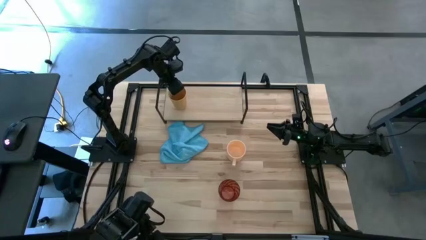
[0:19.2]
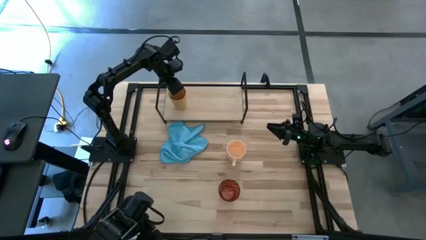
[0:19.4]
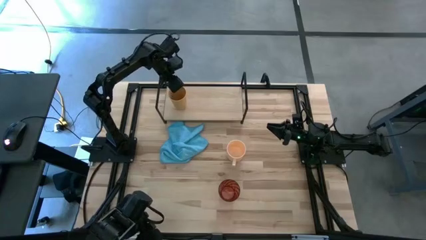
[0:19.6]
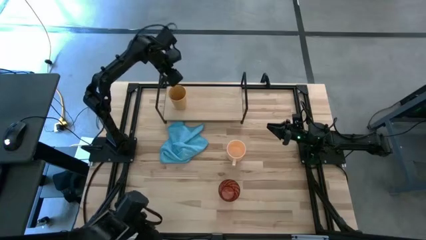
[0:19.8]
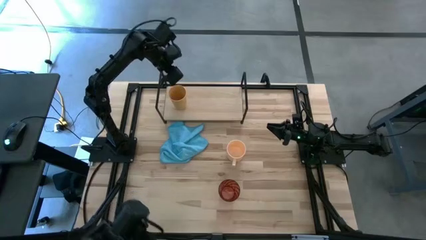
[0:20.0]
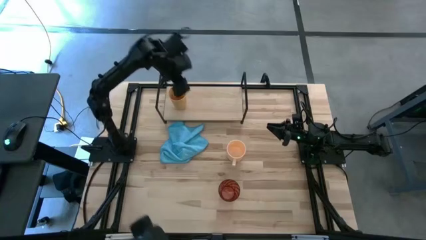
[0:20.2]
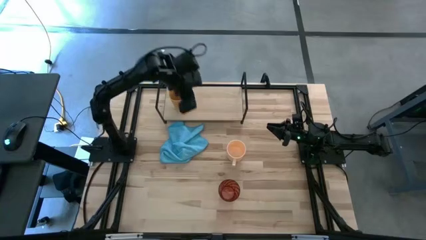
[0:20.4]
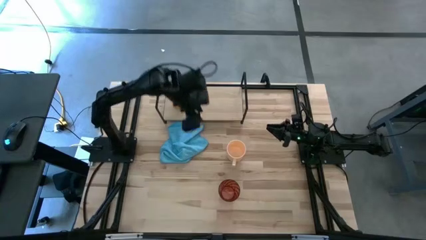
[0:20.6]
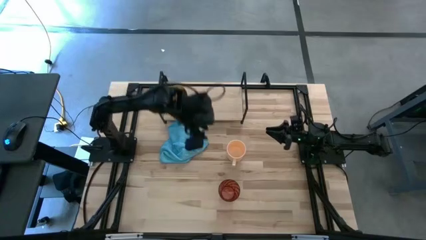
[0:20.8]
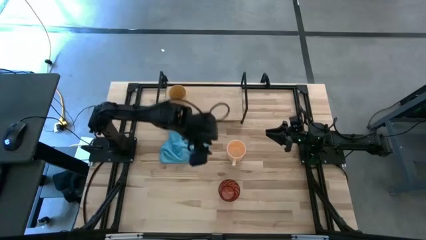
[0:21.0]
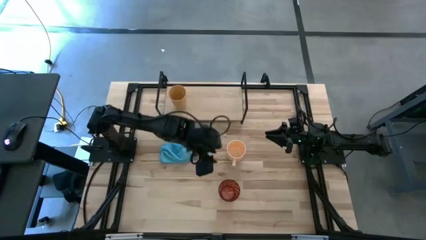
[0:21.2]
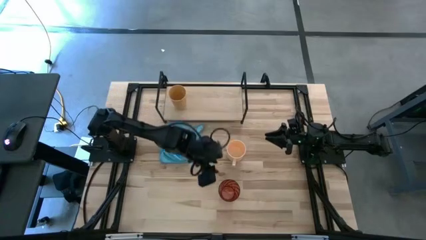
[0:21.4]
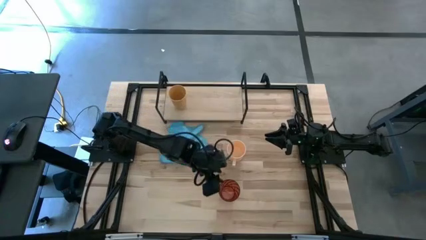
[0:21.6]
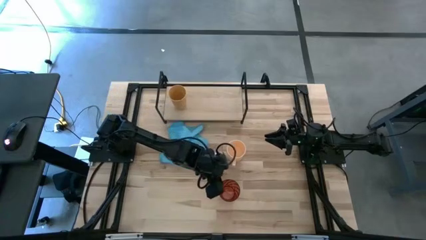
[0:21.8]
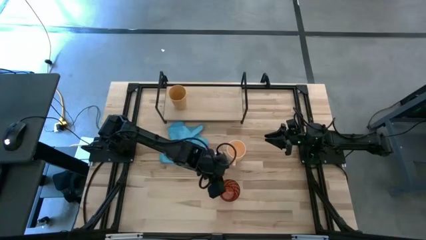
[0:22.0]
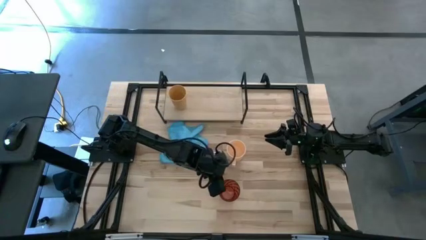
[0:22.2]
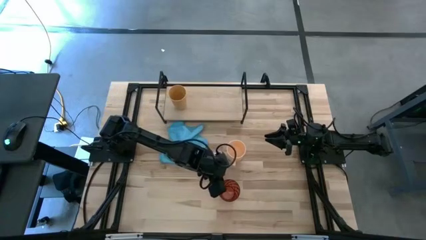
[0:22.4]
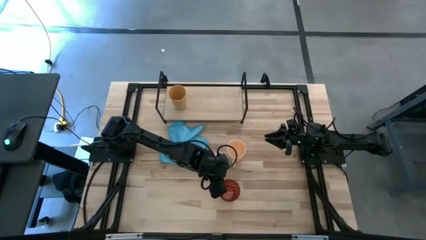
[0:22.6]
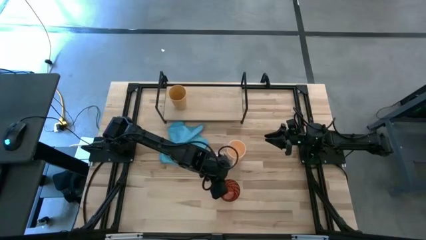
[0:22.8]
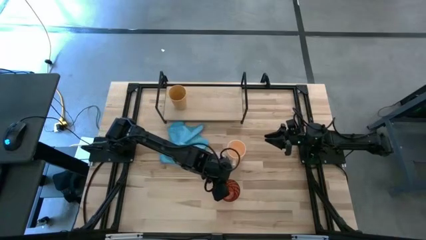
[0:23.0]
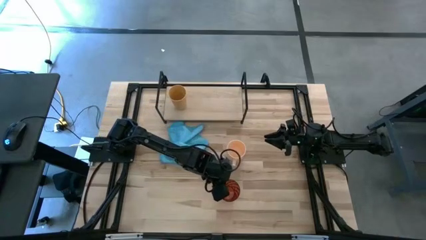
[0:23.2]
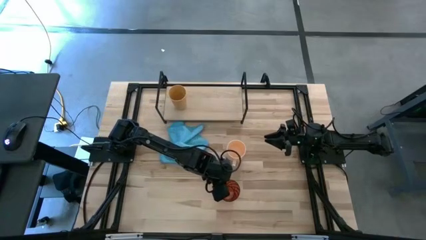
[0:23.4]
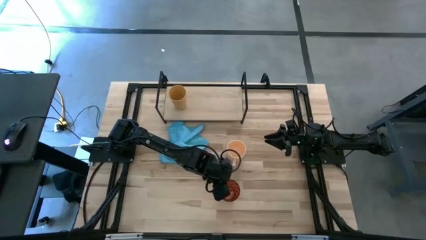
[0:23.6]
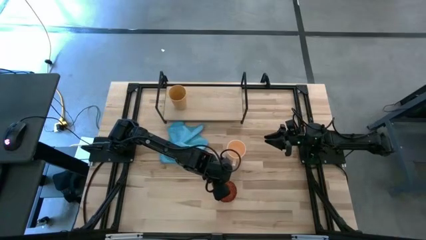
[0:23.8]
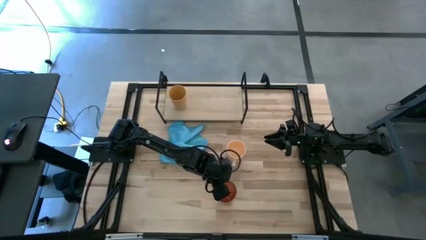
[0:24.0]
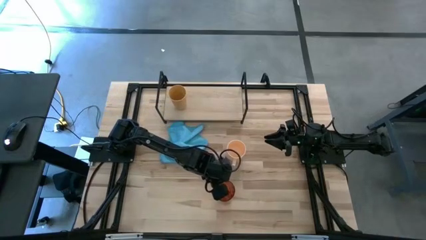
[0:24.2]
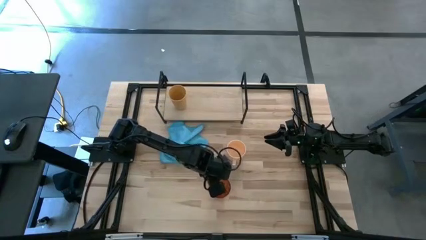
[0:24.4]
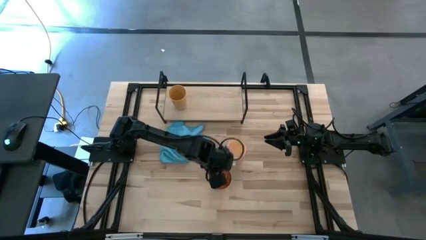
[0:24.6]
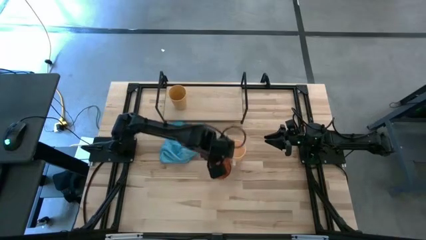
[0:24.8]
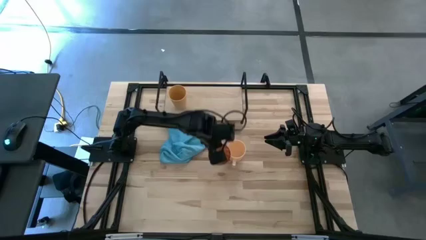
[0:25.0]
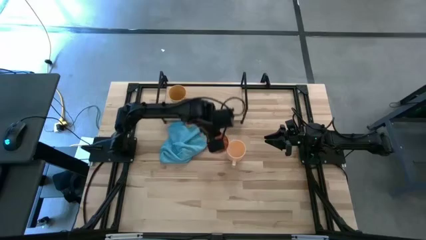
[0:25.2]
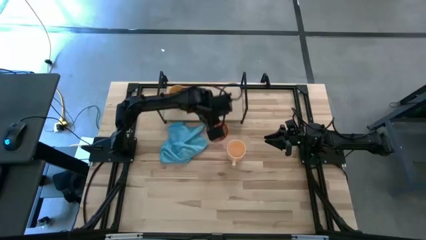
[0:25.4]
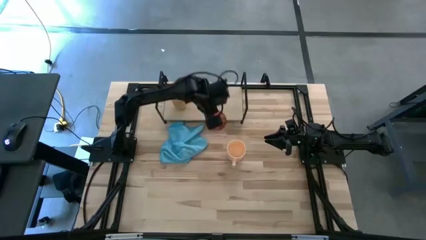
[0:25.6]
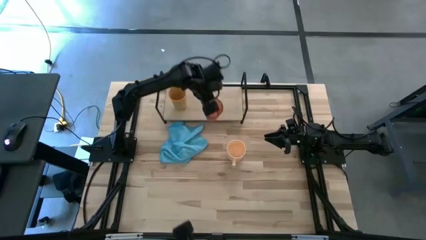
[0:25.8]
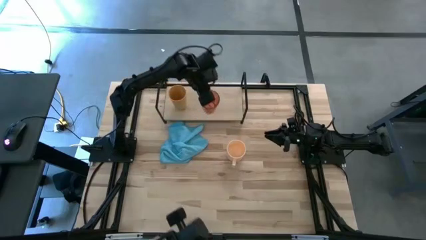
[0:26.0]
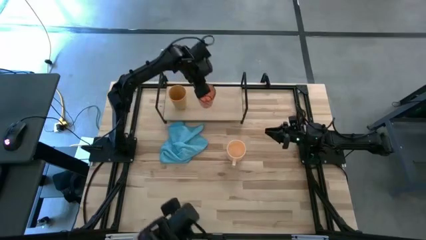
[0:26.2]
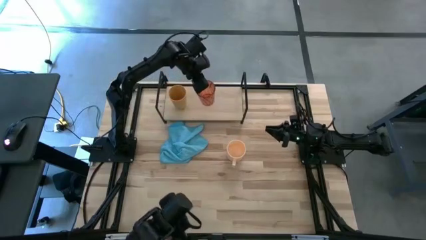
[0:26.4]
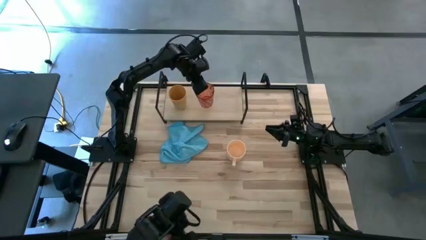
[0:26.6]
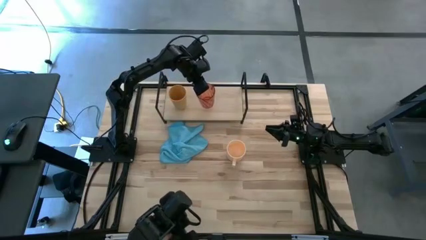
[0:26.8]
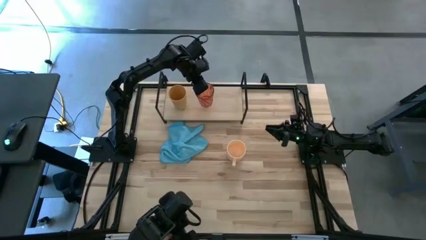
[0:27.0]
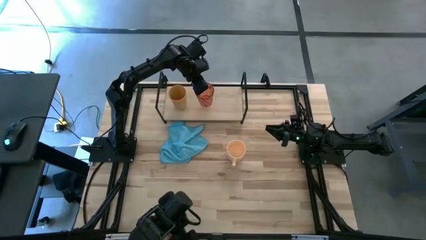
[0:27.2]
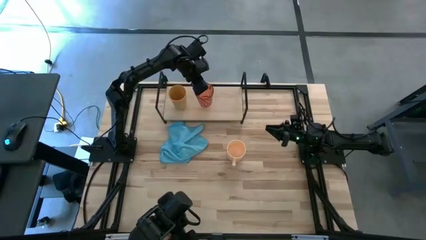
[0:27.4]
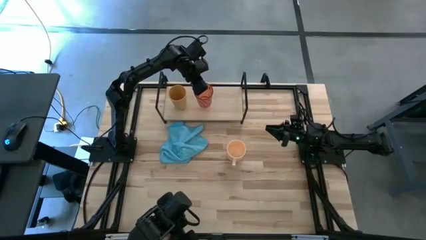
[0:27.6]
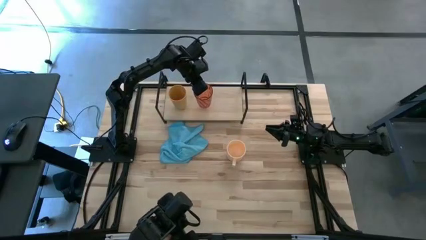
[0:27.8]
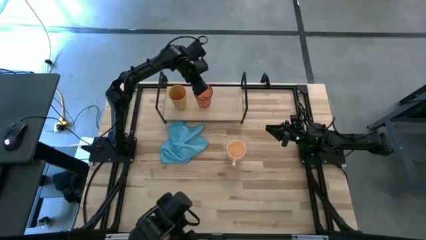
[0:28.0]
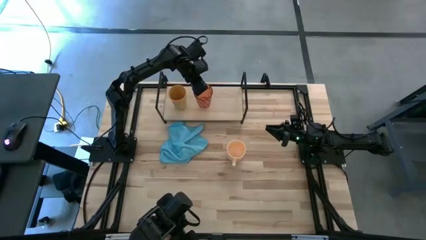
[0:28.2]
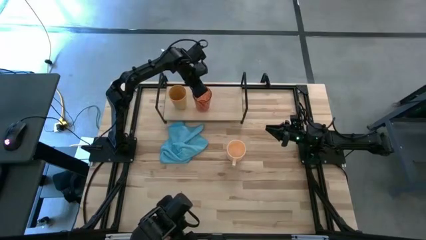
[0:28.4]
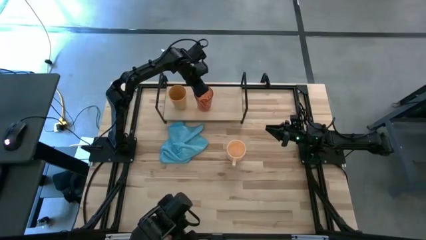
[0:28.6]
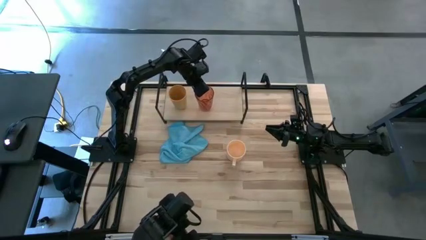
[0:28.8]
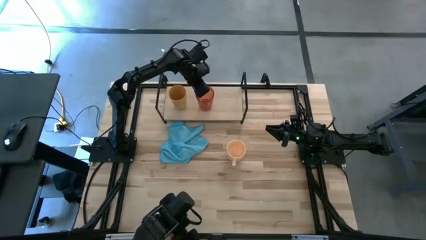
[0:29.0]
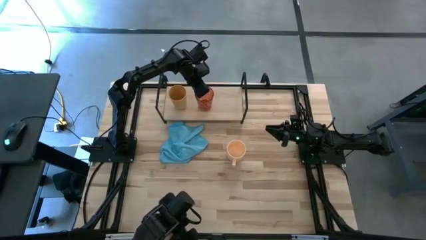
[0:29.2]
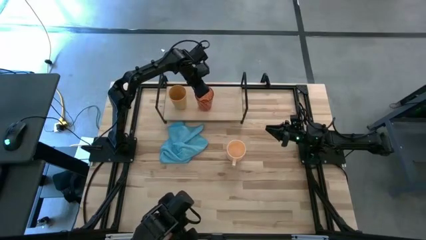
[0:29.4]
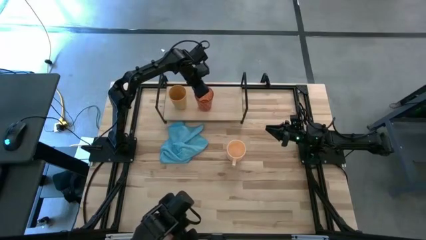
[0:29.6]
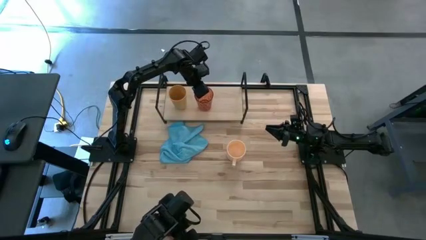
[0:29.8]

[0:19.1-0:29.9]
Task: Stack small to large cups/mugs on shelf
Put the brown cup on the shelf
